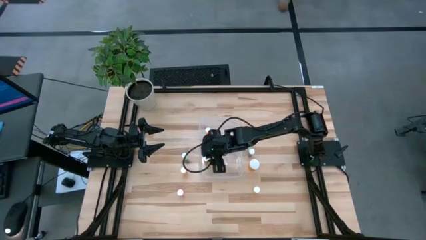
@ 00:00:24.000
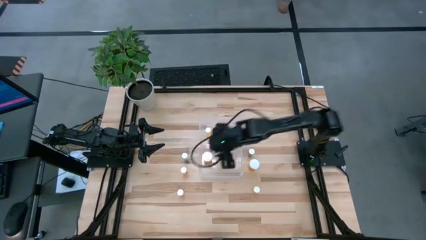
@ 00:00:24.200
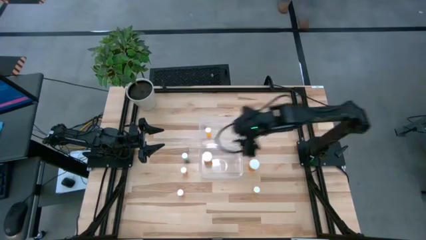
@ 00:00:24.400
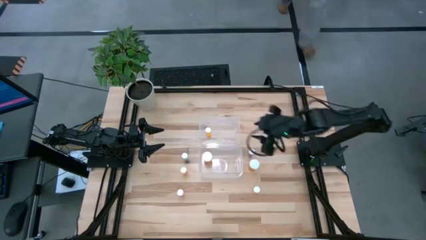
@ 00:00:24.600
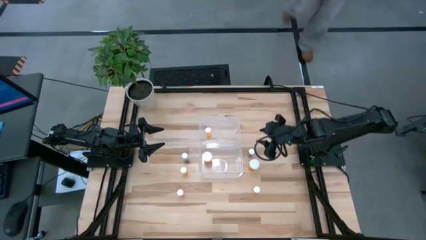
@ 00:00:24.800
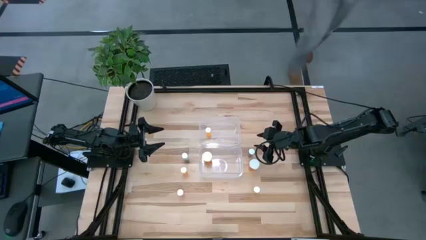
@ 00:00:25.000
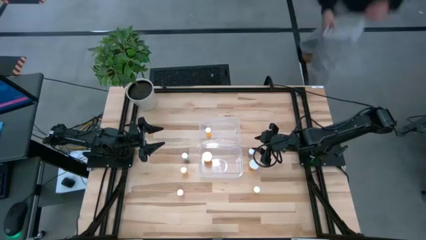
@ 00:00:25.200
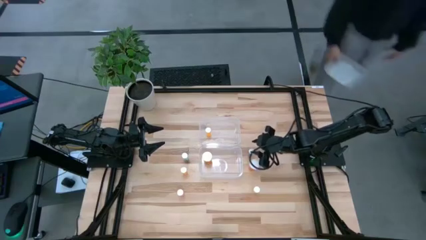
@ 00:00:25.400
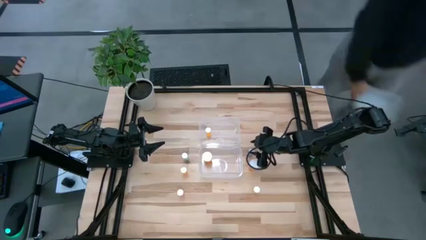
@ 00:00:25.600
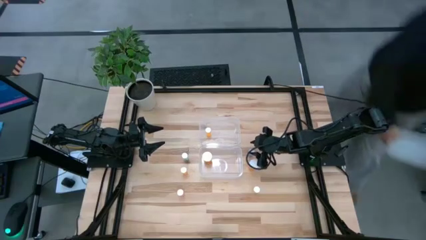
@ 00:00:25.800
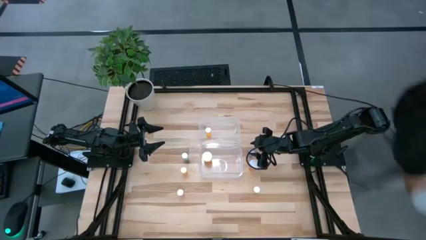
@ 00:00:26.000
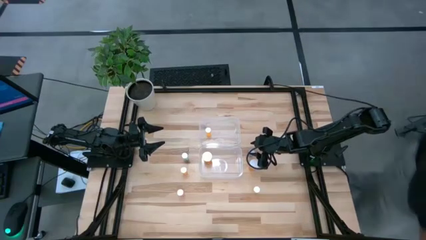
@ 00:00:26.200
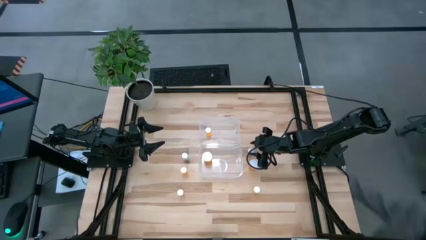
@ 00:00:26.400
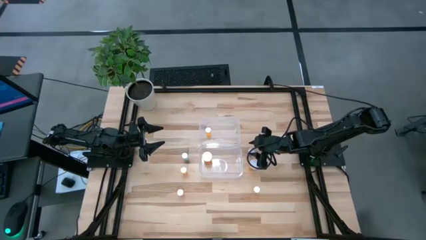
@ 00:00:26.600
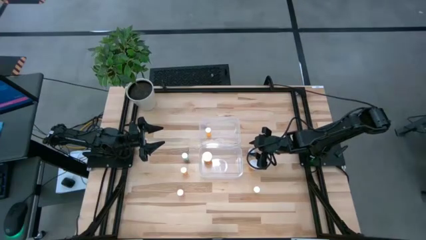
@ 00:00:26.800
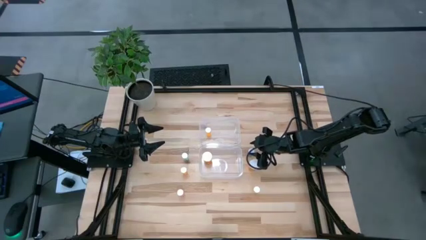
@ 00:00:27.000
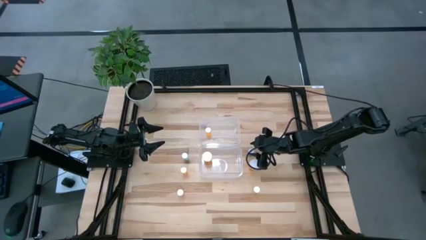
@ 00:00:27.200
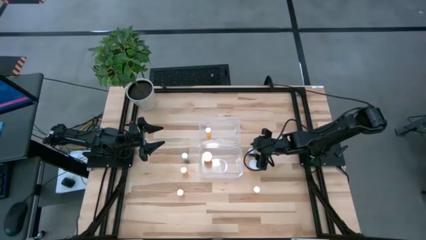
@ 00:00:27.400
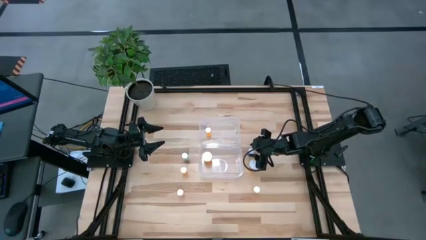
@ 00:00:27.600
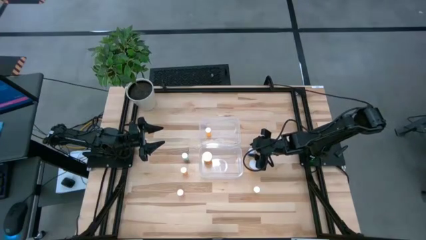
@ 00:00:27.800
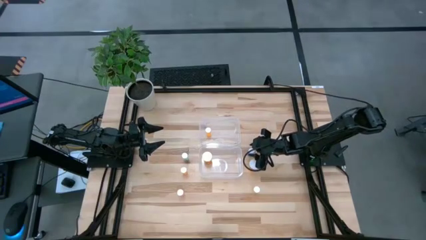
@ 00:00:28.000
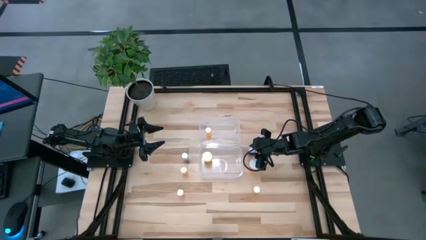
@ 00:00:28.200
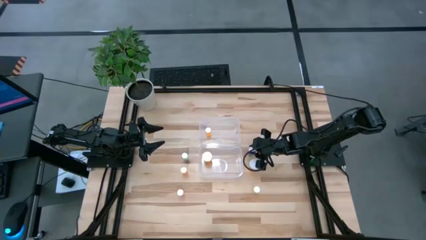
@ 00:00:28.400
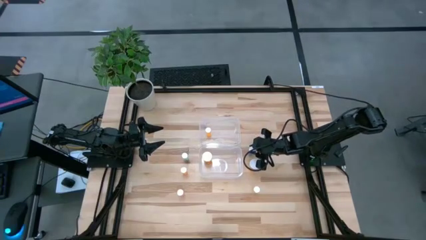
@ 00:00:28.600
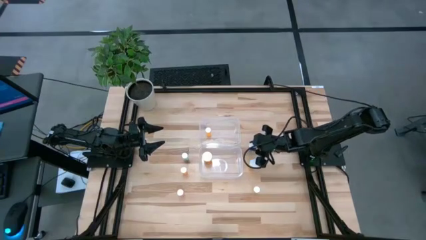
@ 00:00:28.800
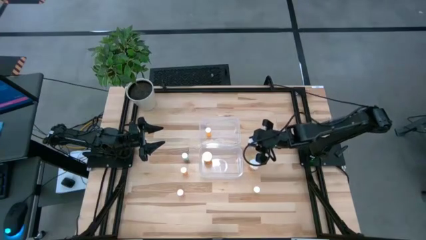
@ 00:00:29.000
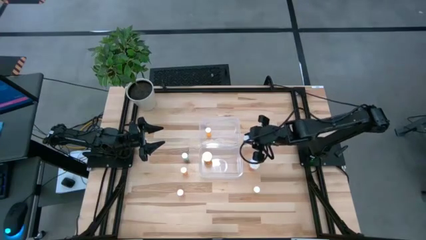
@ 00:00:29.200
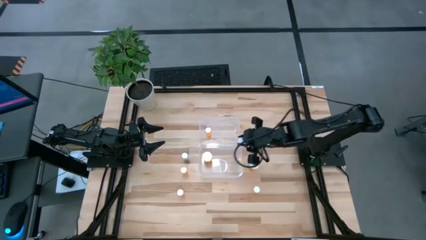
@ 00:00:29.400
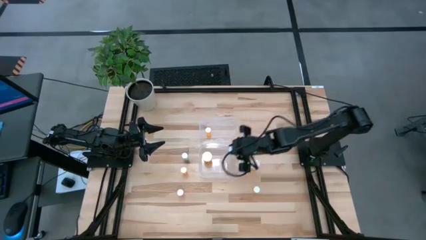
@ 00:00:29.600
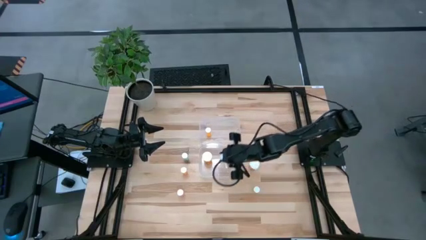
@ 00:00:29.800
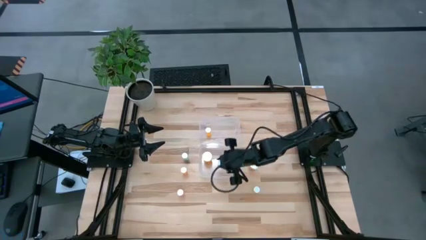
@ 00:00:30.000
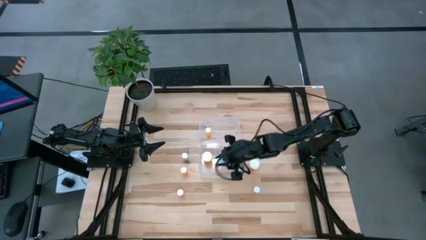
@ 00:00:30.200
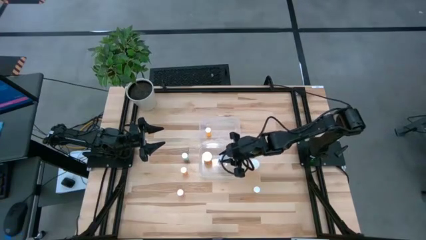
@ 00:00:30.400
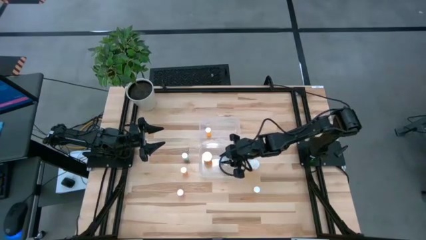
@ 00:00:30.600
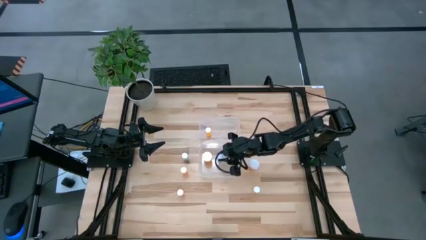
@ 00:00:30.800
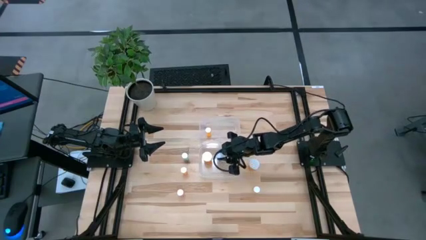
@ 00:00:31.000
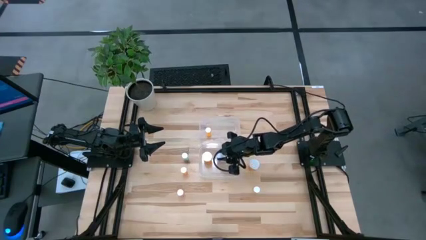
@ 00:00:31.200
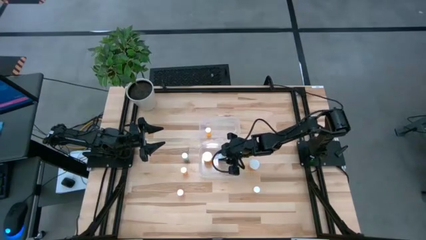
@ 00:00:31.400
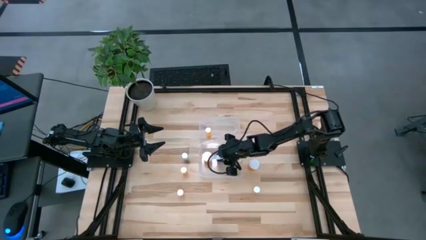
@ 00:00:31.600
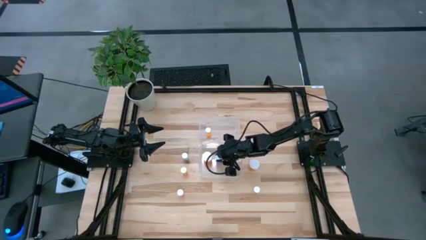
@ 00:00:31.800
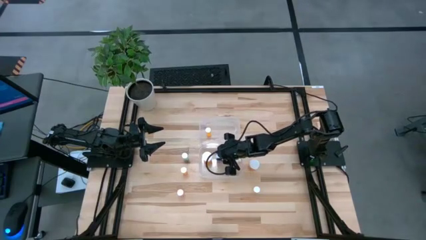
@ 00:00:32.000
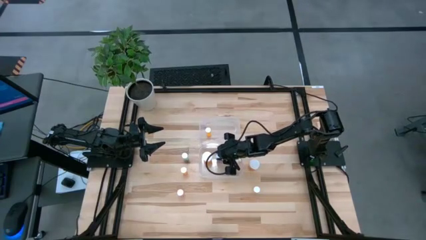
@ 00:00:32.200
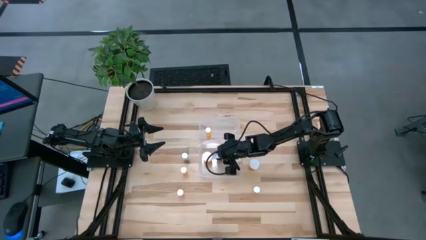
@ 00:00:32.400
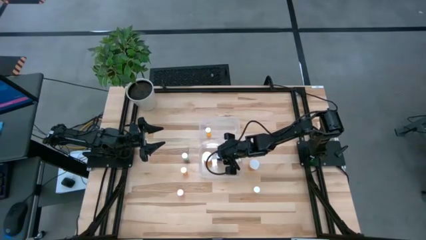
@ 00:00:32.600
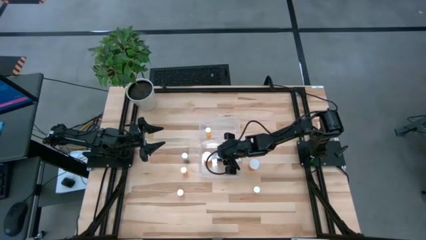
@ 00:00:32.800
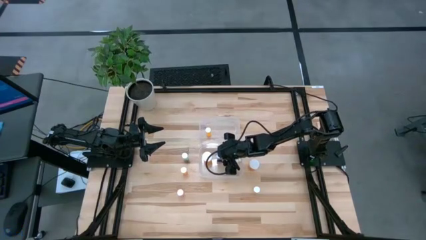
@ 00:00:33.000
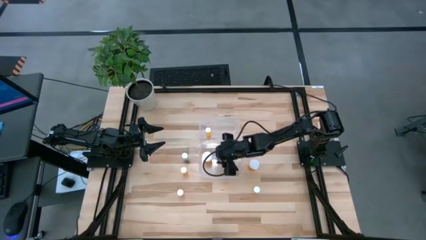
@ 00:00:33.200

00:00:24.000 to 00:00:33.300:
Task: Pick and place medicine bottles into bin by pill shape (circle, oval)
Put the blue capsule bottle into the bottom transparent bin

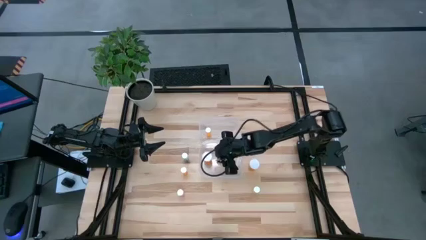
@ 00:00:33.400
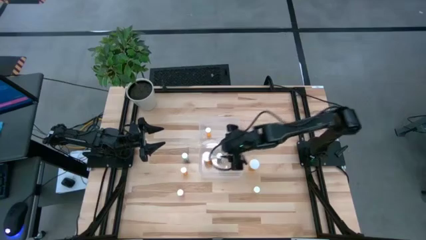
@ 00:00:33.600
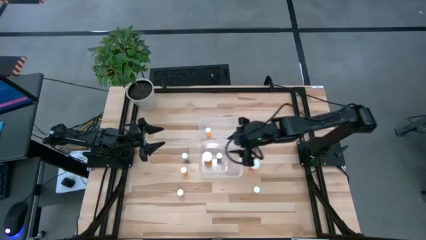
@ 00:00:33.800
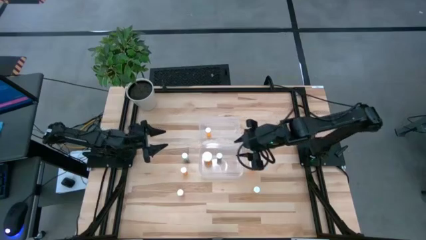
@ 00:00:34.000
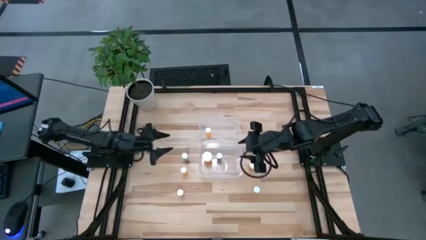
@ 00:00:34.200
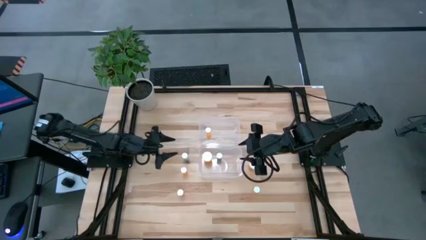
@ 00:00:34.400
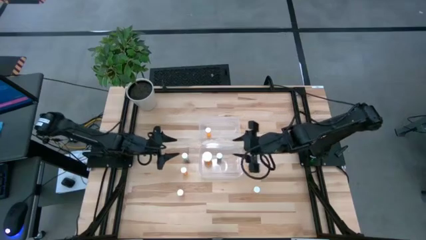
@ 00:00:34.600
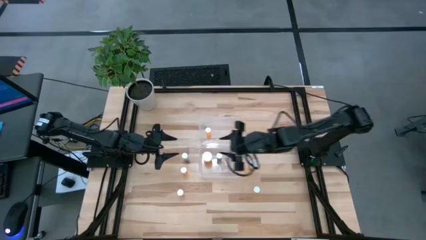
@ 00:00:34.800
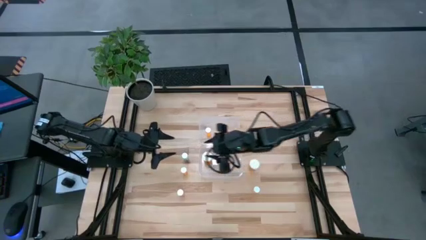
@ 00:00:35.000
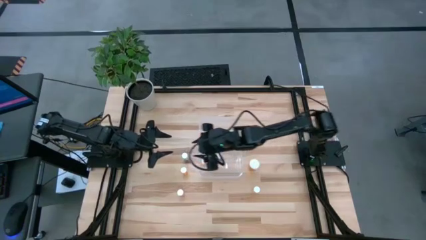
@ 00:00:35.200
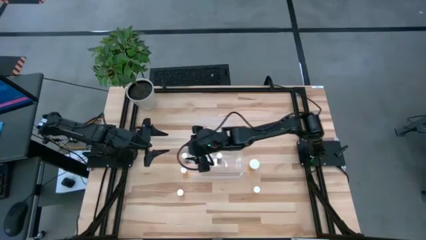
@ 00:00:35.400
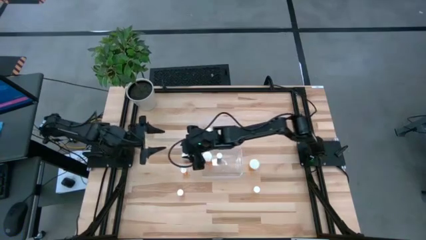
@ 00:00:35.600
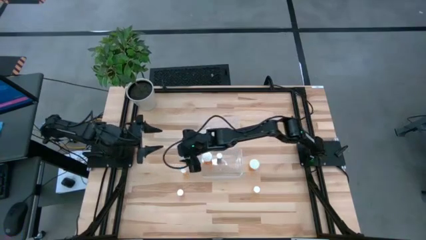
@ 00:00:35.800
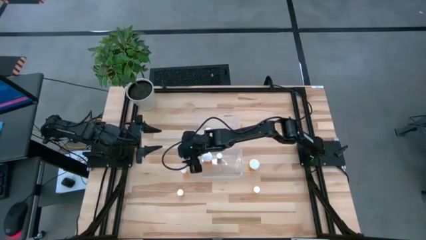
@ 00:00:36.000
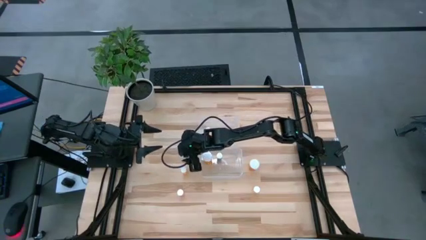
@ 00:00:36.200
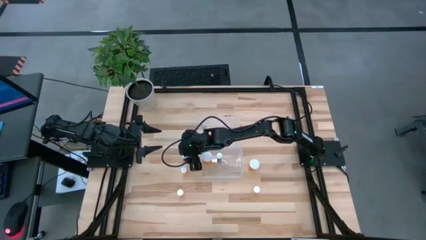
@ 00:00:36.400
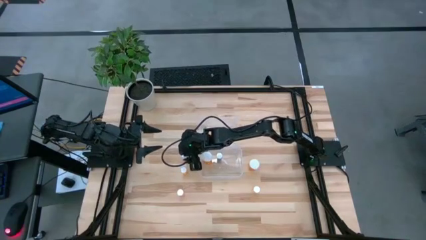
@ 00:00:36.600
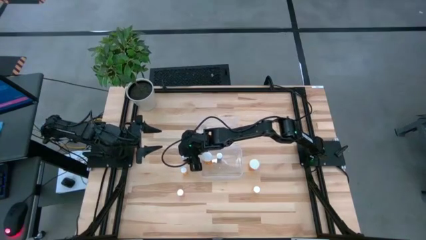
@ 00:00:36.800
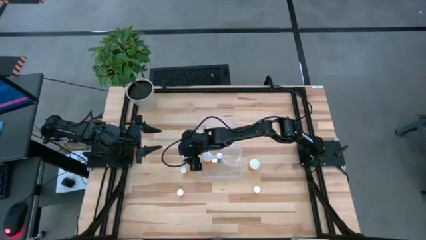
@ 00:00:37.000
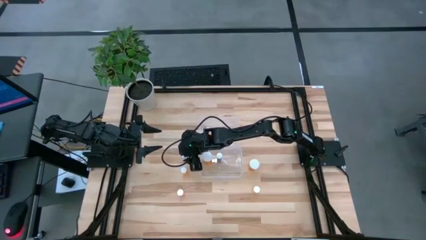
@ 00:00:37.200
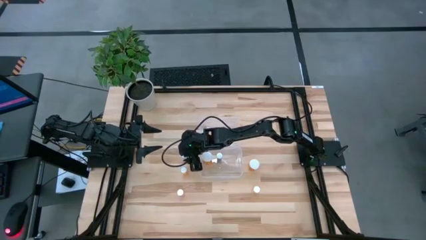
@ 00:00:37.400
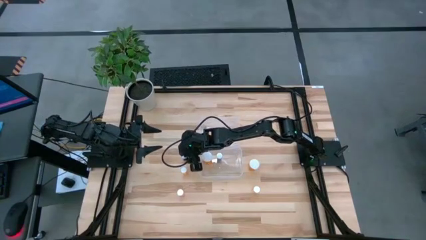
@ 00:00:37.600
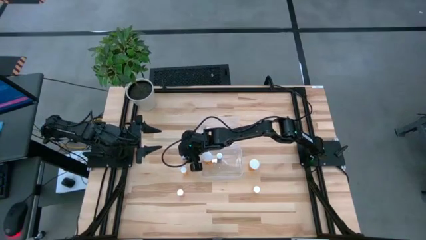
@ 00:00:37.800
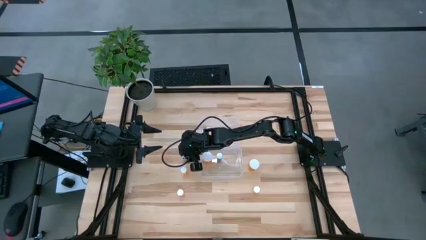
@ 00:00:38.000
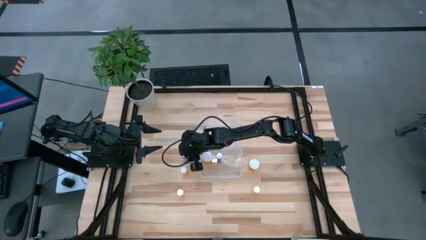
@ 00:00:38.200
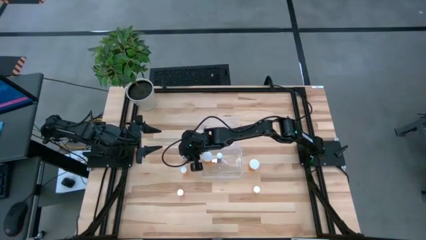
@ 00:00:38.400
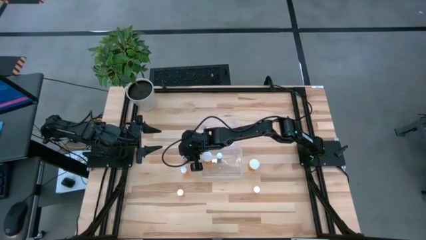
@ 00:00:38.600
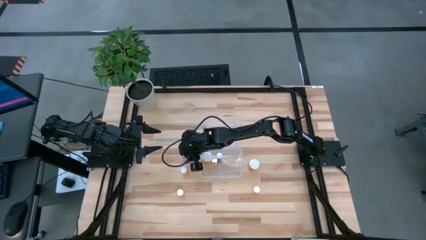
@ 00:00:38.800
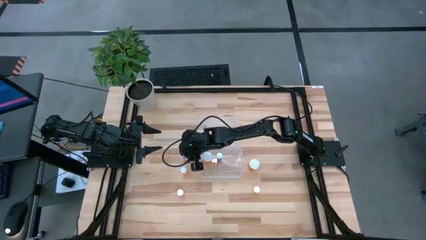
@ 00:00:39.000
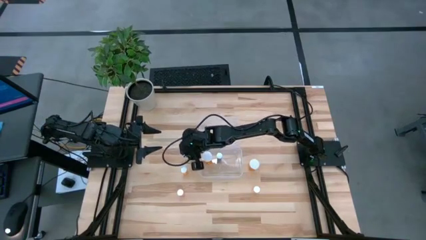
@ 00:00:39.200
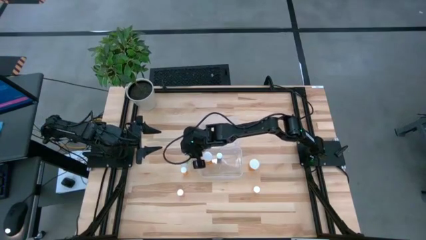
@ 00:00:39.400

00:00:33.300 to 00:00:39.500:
Put the blue tablet bottle into the top transparent bin
